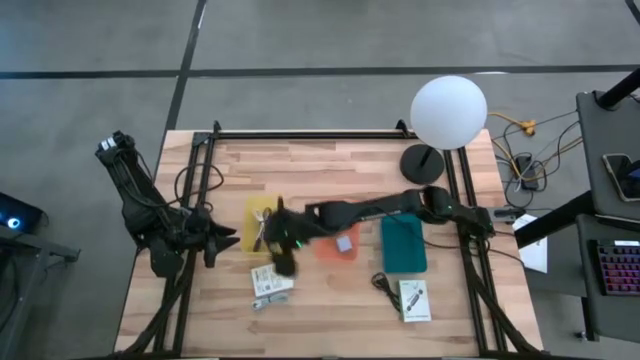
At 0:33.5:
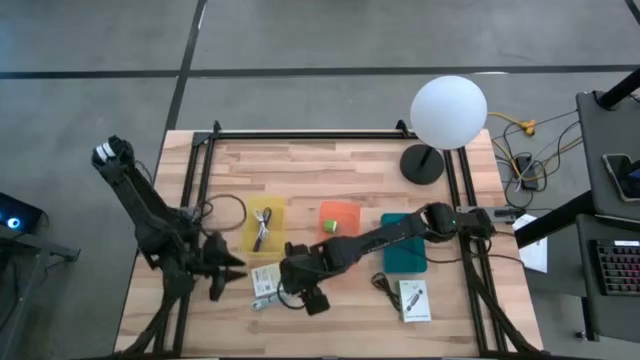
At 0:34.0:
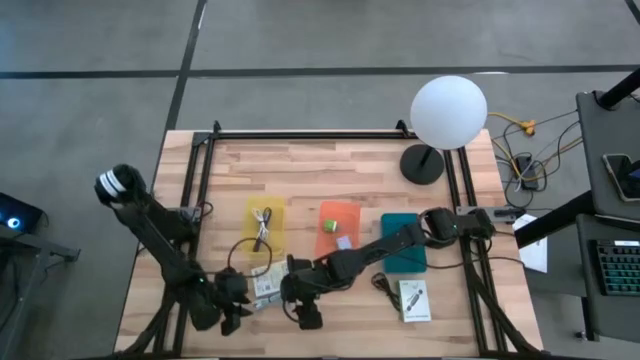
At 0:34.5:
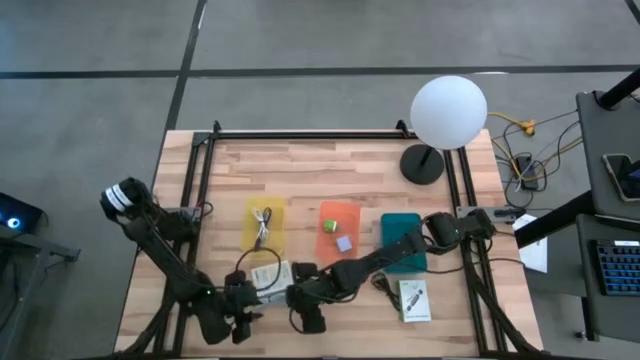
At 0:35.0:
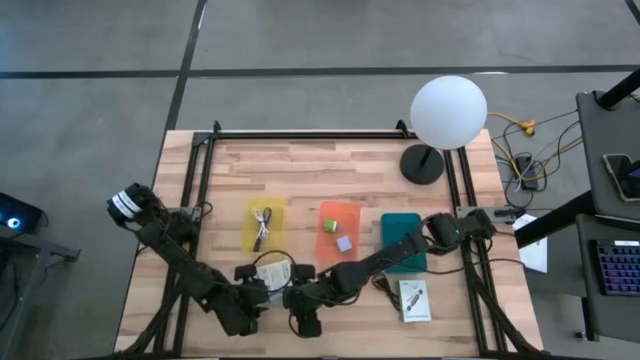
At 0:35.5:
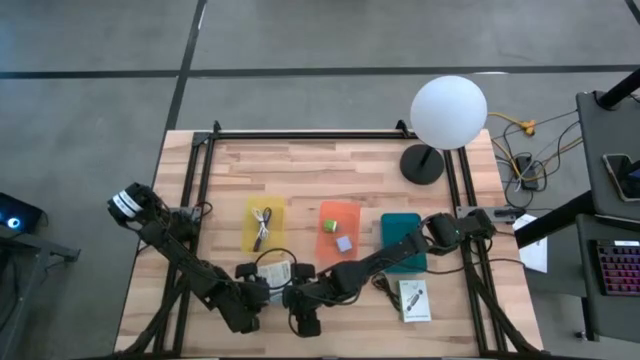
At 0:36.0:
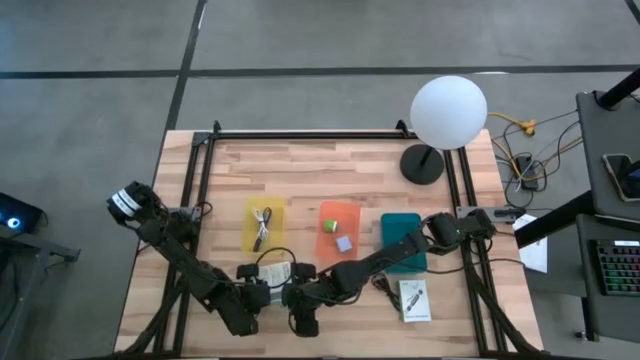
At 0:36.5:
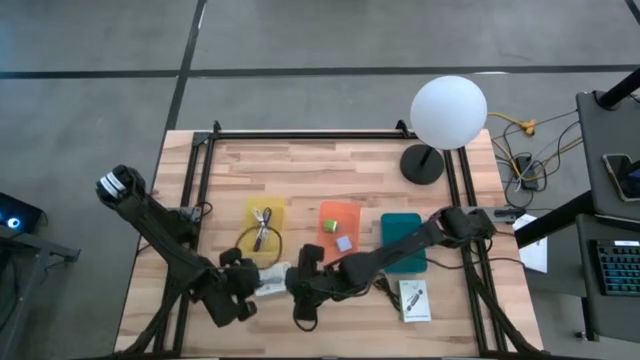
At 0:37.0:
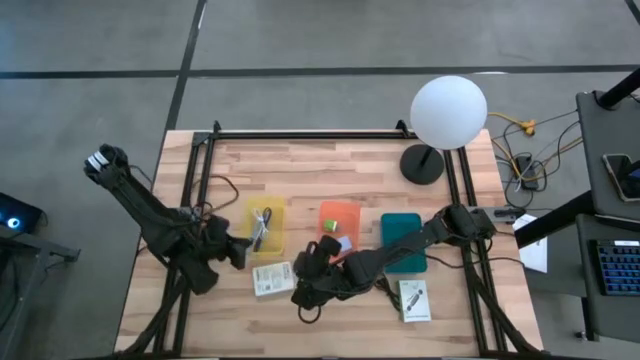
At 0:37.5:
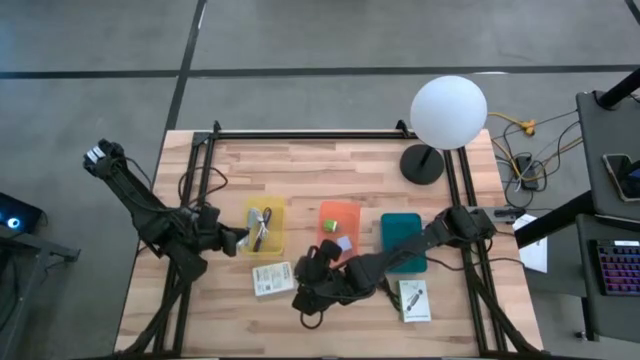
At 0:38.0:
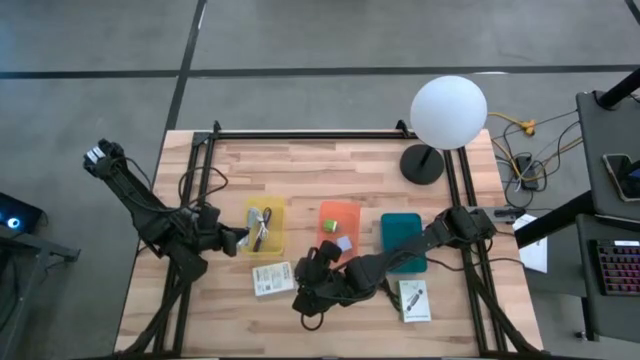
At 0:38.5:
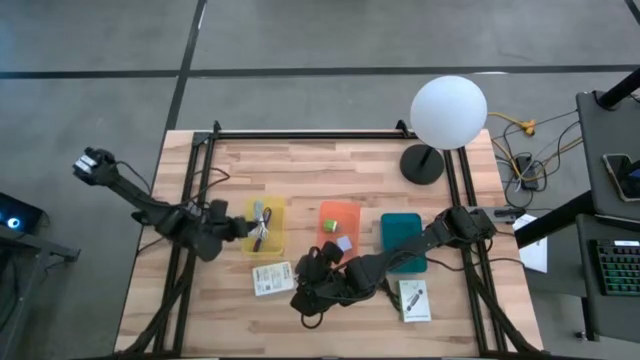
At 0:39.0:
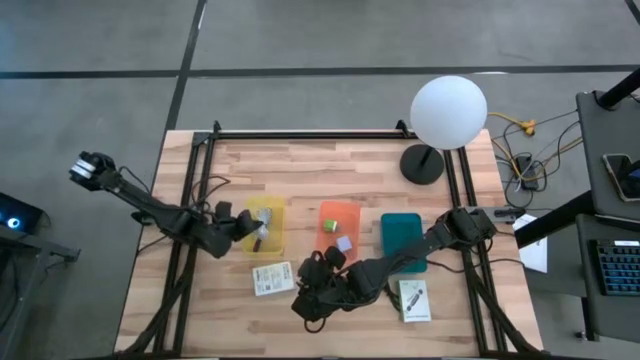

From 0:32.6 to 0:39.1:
Task: Pick and place items into bin
Put the light blue charger cable into the yellow bin

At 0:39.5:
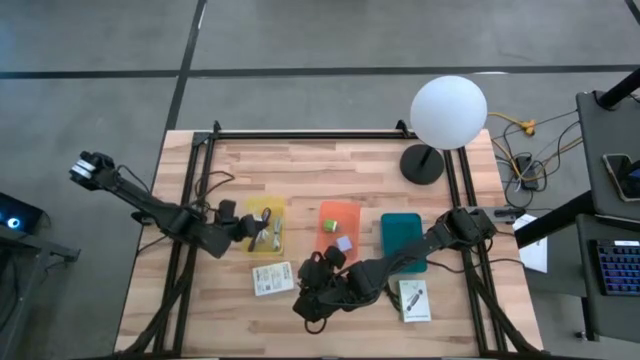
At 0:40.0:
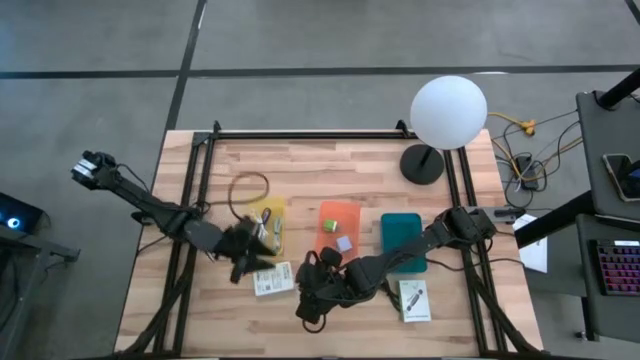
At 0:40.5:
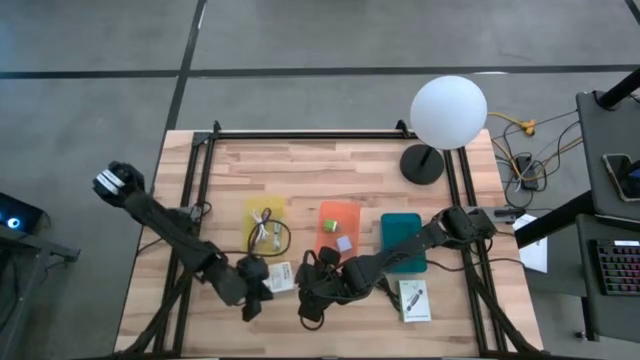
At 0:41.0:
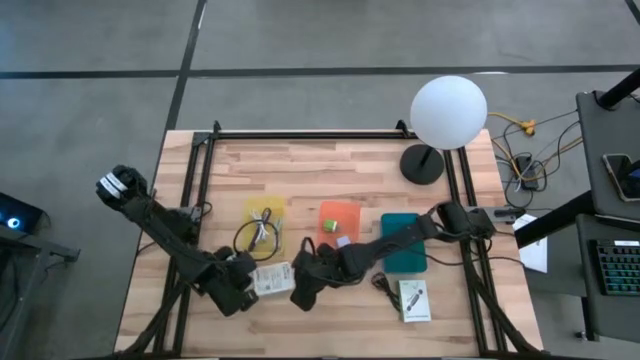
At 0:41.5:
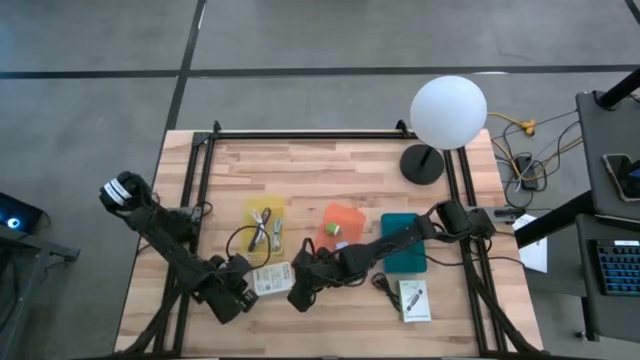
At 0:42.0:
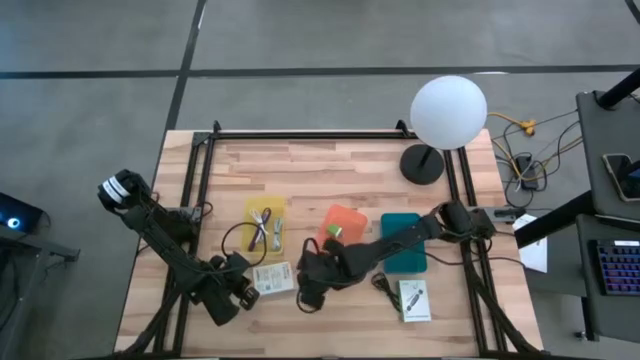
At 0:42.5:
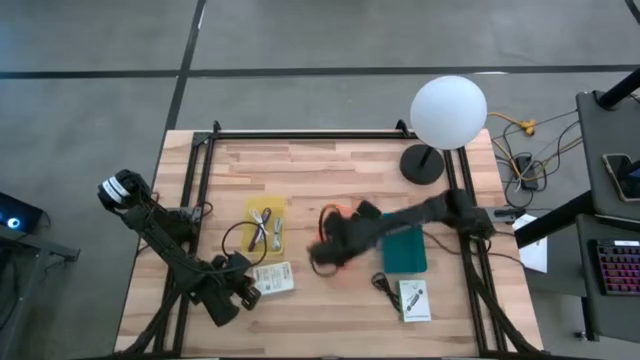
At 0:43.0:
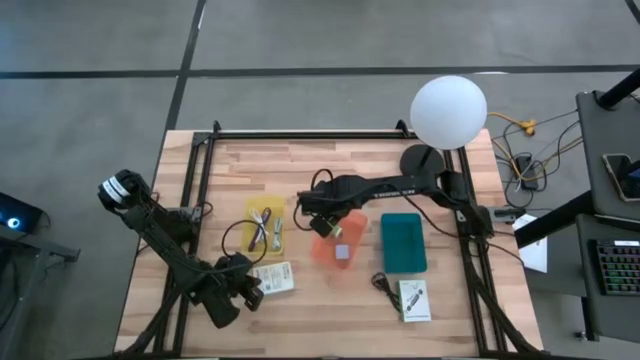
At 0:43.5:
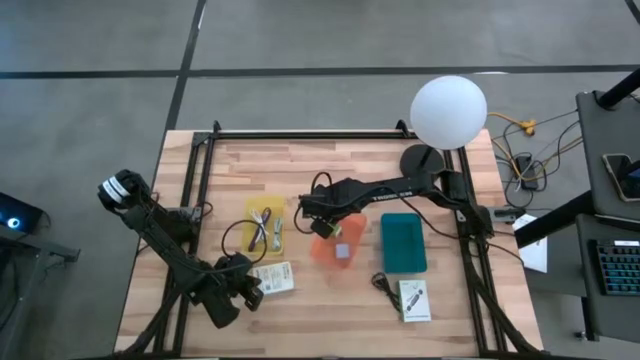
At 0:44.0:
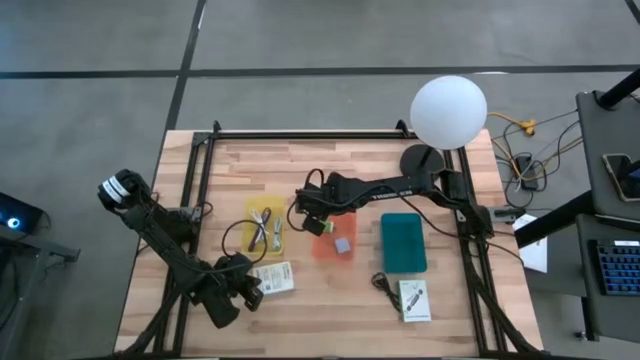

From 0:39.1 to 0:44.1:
Adjust the orange bin

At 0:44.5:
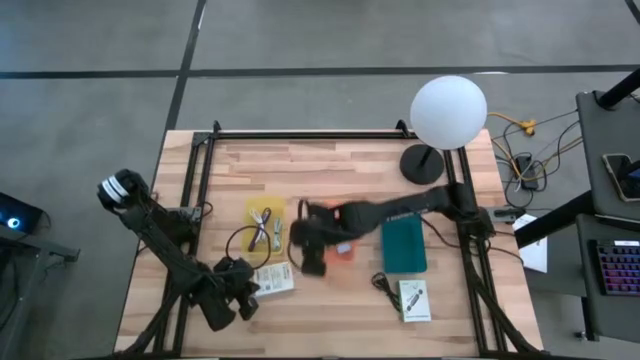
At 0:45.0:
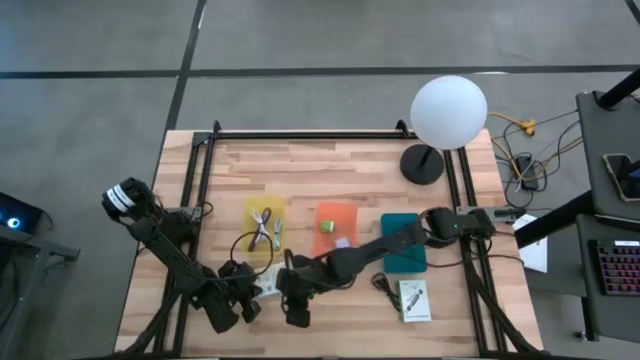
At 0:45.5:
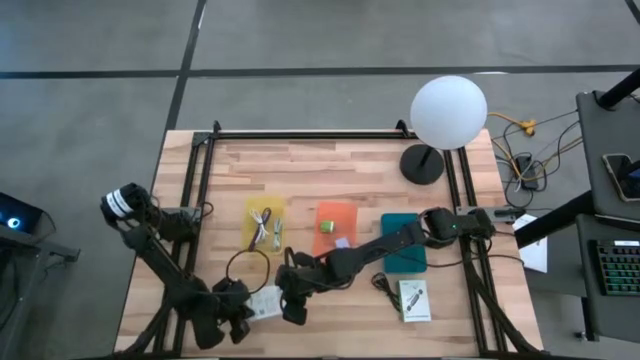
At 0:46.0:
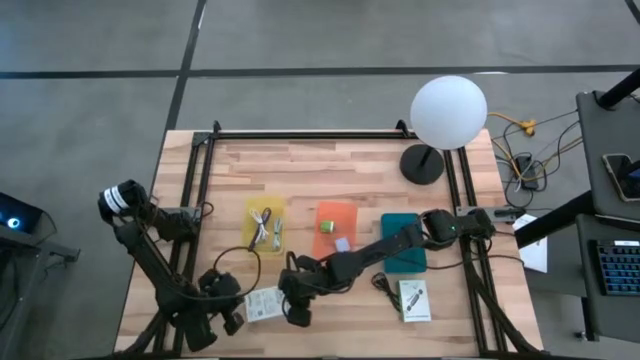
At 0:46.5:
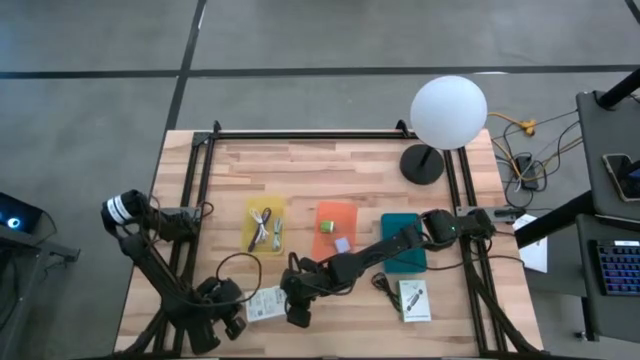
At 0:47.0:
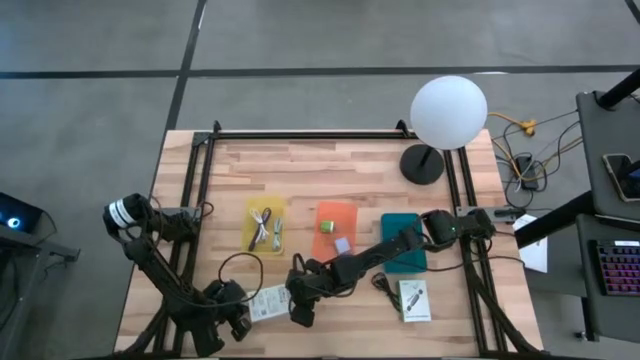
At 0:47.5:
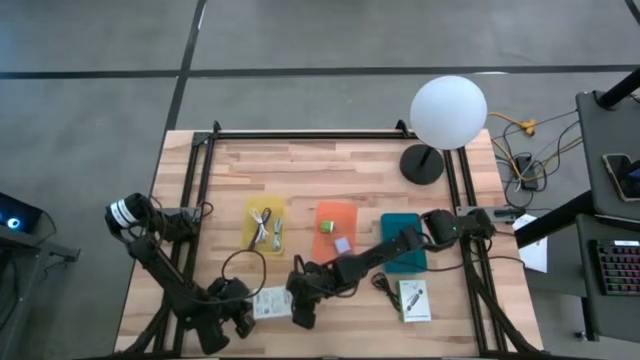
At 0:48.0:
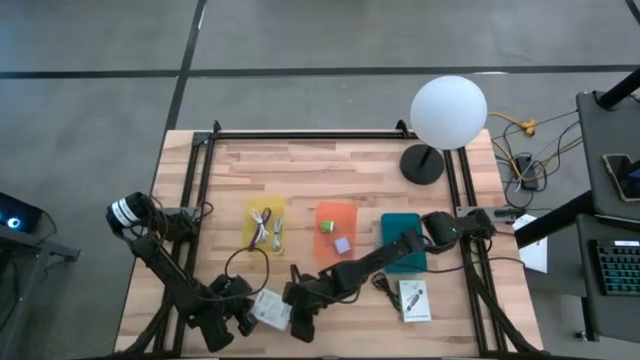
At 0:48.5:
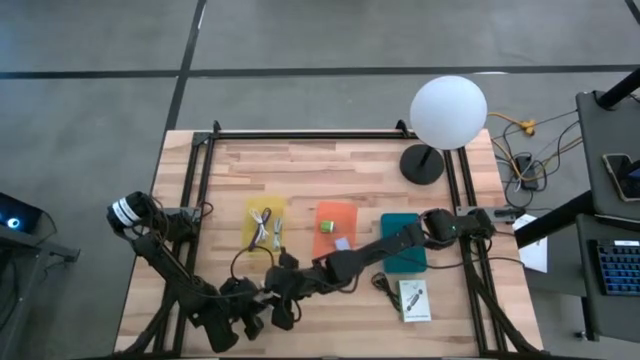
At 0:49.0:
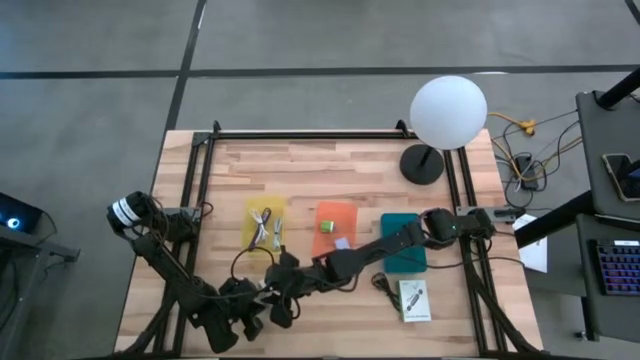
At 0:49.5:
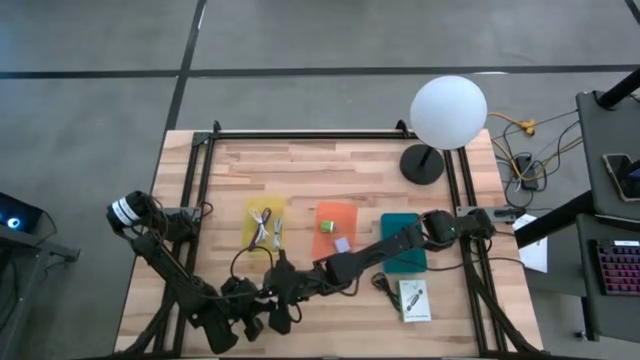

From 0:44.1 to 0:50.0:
Put the left white card reader box into the blue bin

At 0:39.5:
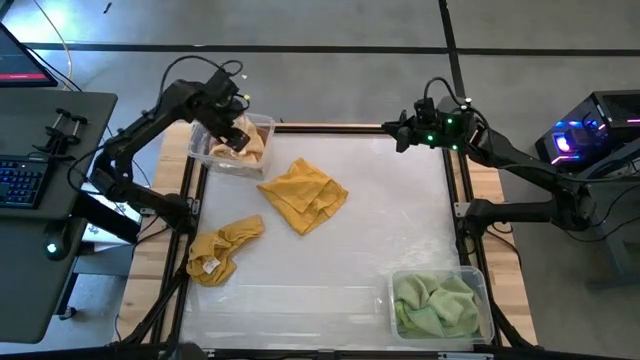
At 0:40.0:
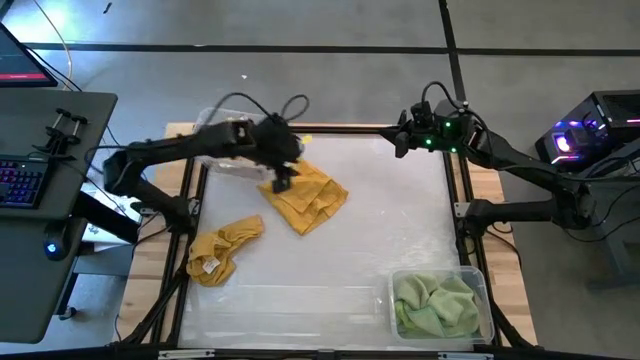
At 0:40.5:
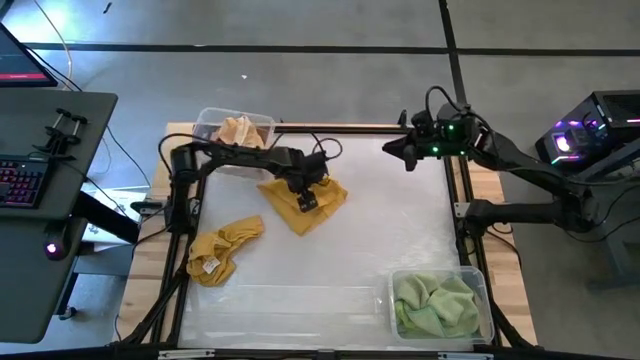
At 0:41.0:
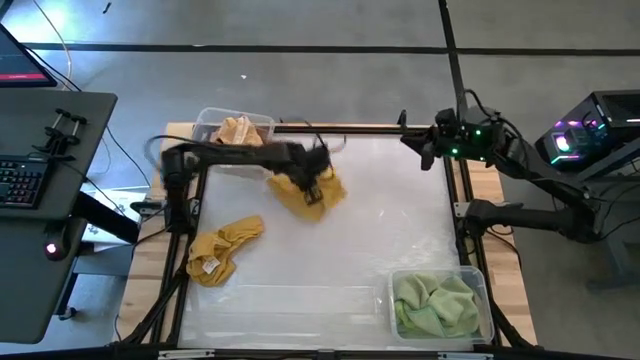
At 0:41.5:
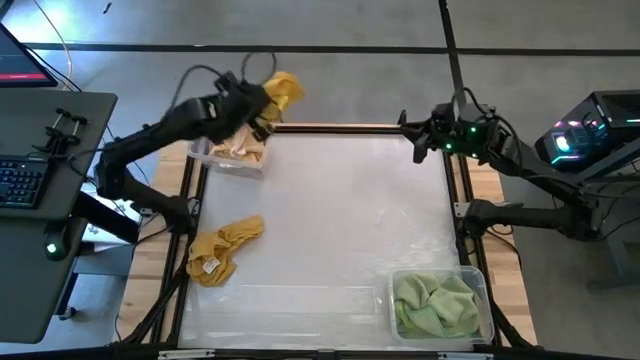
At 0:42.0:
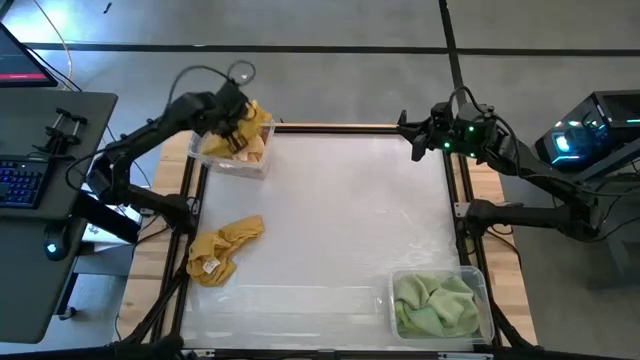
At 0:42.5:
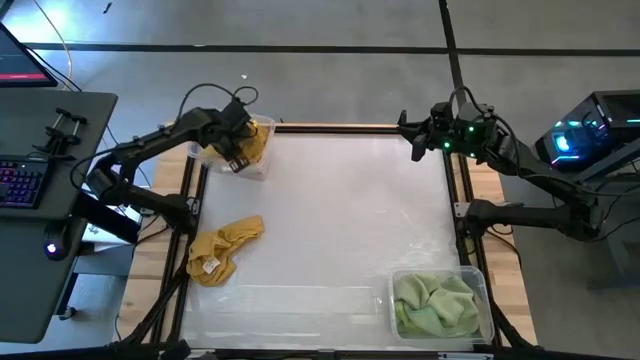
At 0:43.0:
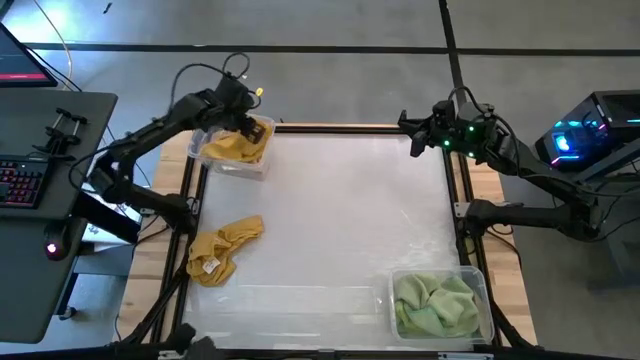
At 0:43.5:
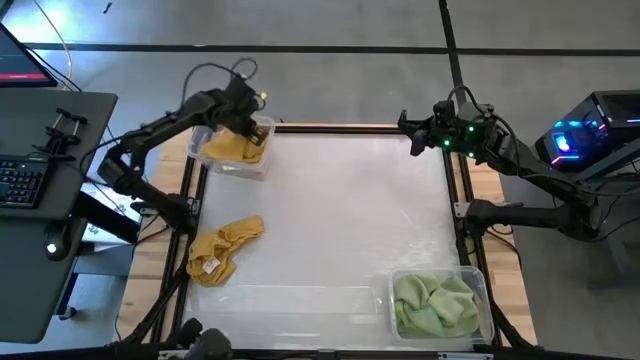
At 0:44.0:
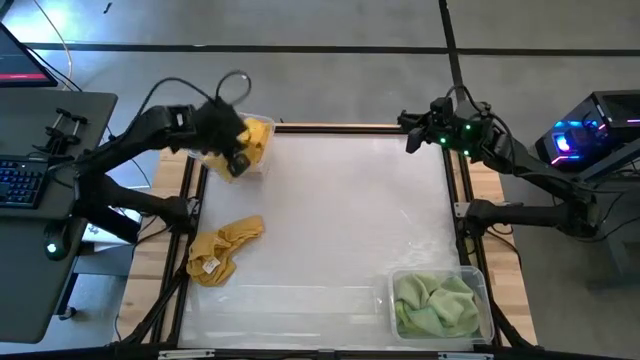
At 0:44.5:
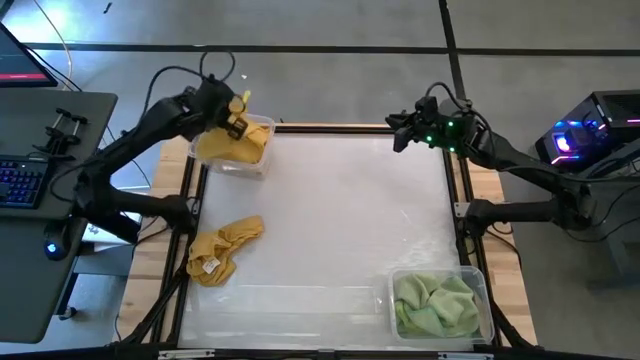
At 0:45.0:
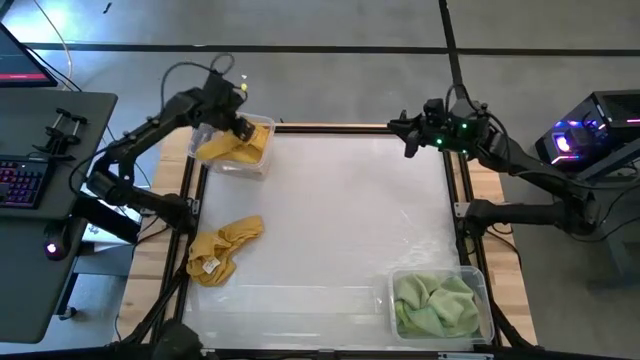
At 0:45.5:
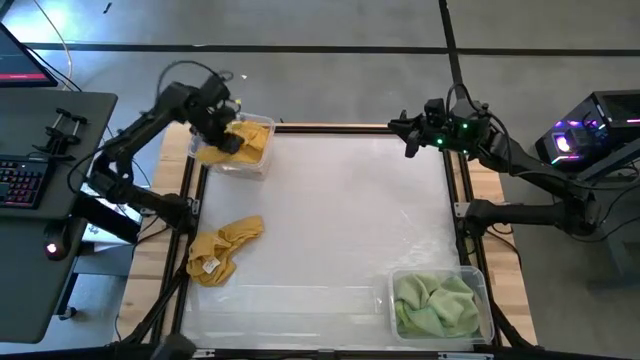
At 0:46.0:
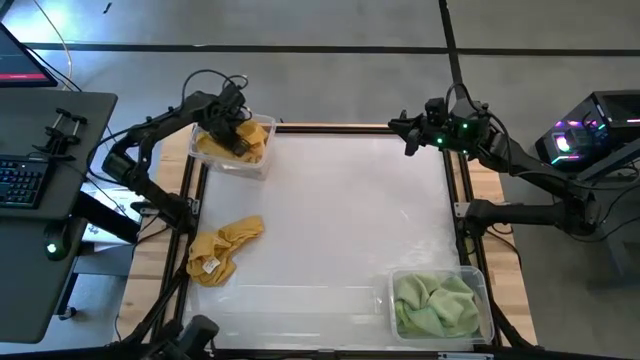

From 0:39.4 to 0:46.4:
Task: Sort towels by color in basket
Put the right yellow kitchen towel into the top transparent bin
